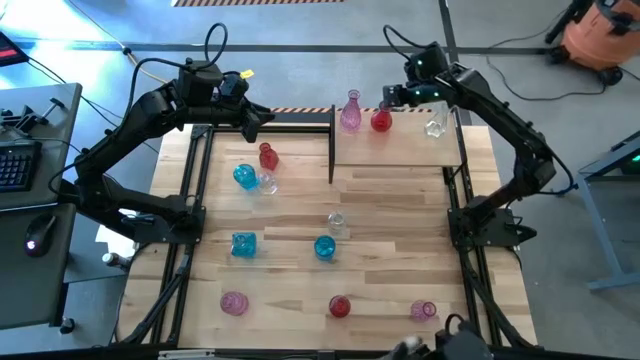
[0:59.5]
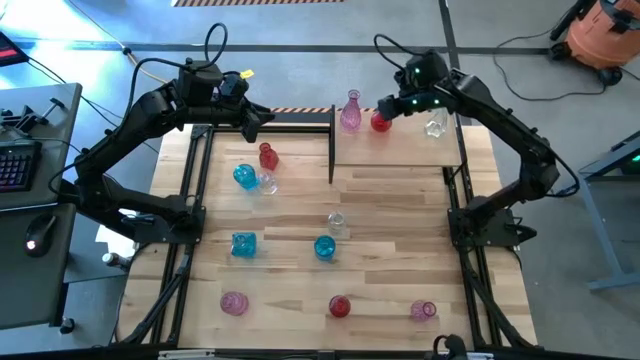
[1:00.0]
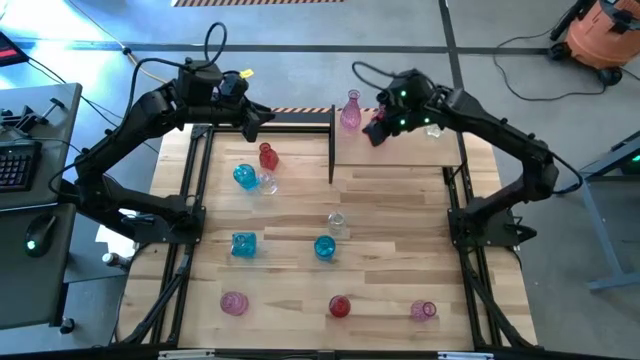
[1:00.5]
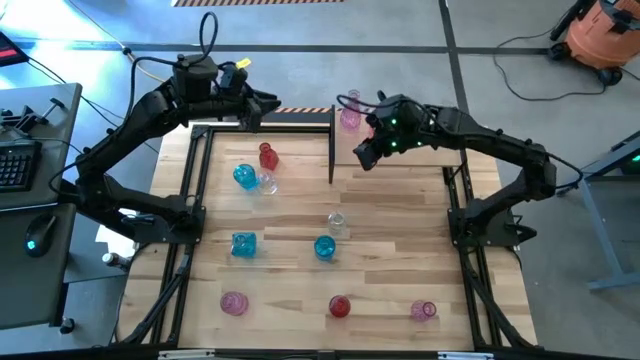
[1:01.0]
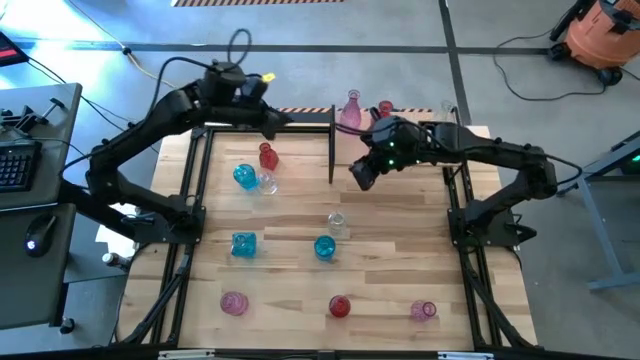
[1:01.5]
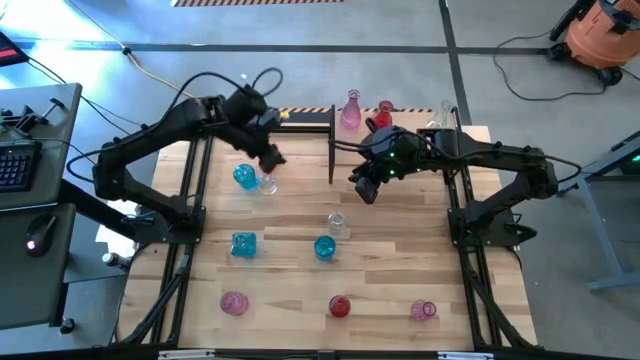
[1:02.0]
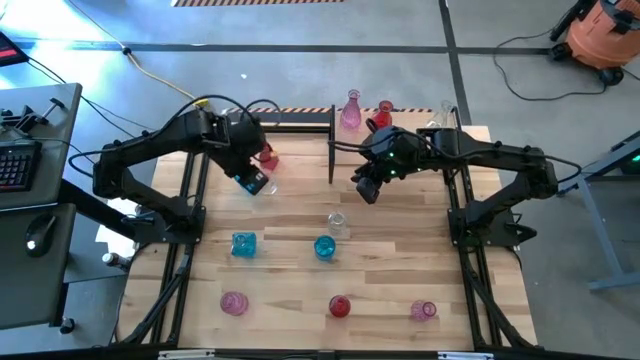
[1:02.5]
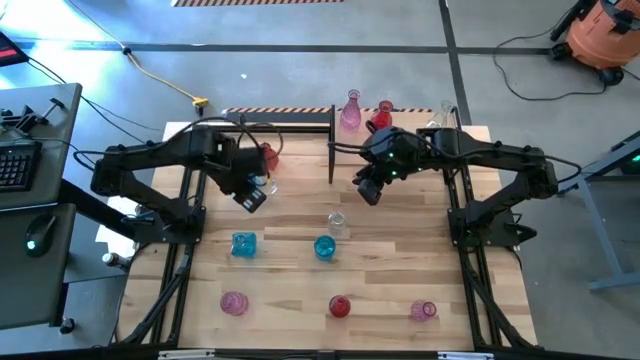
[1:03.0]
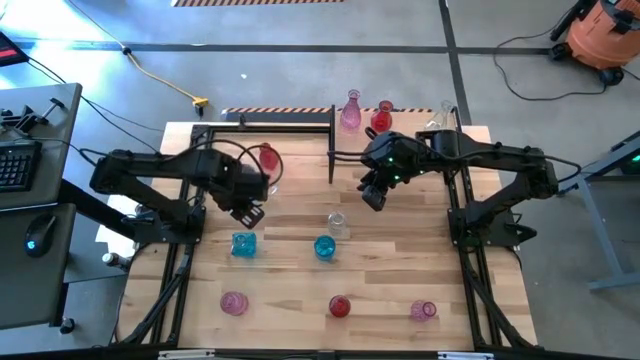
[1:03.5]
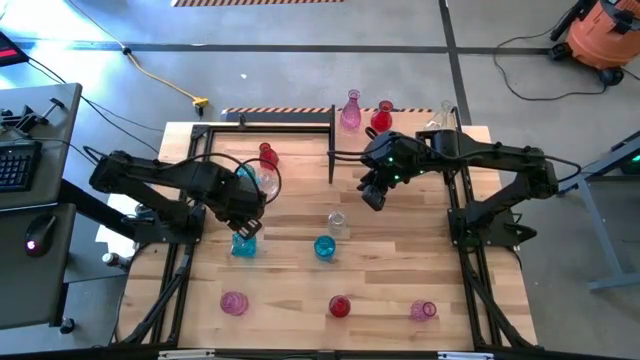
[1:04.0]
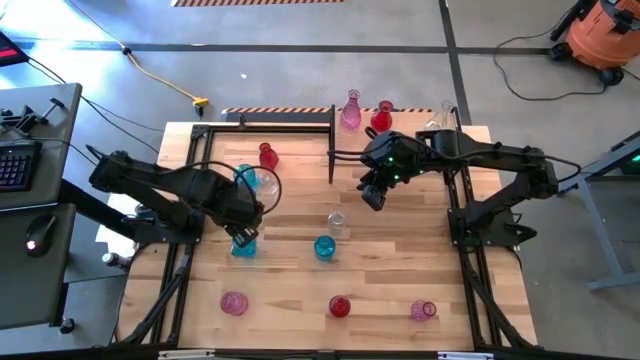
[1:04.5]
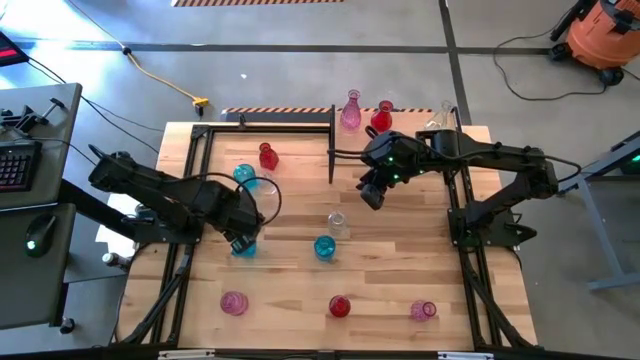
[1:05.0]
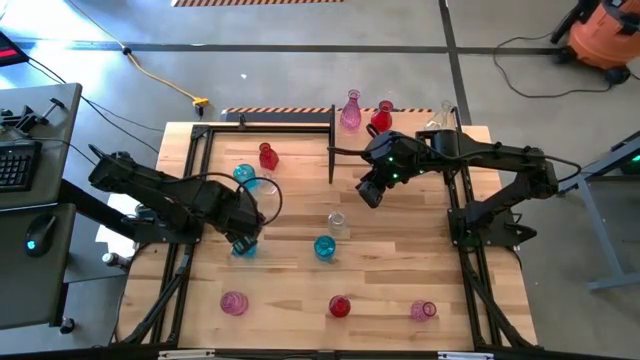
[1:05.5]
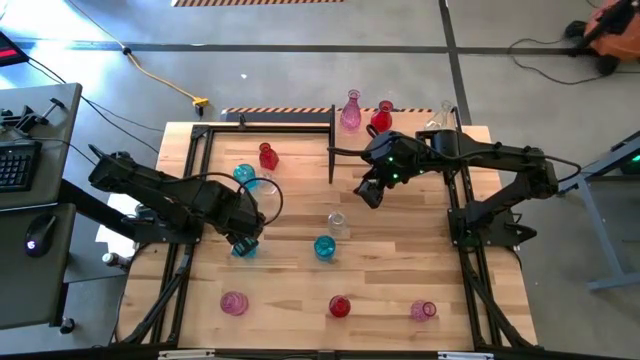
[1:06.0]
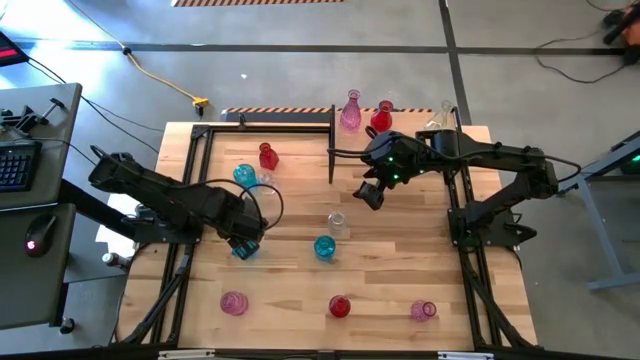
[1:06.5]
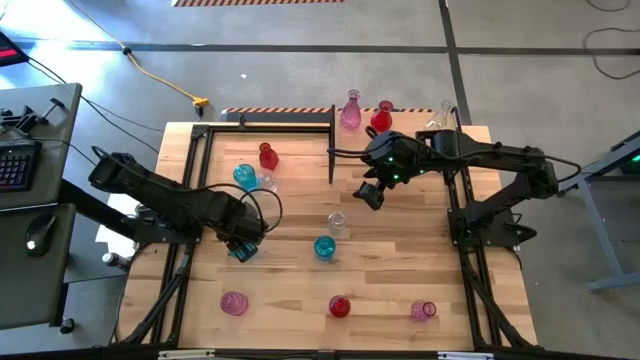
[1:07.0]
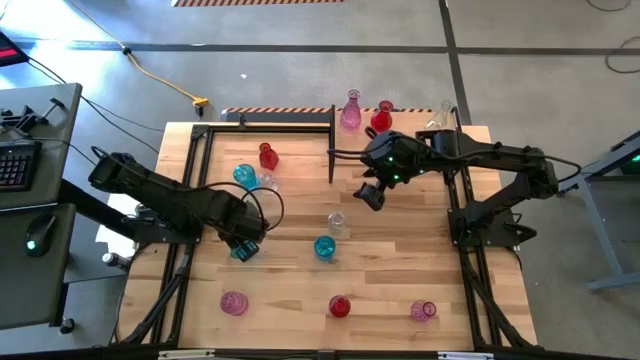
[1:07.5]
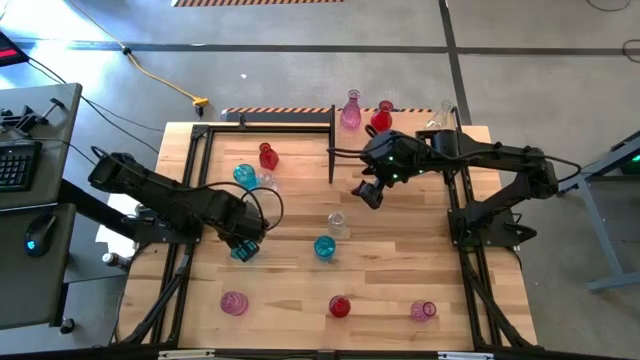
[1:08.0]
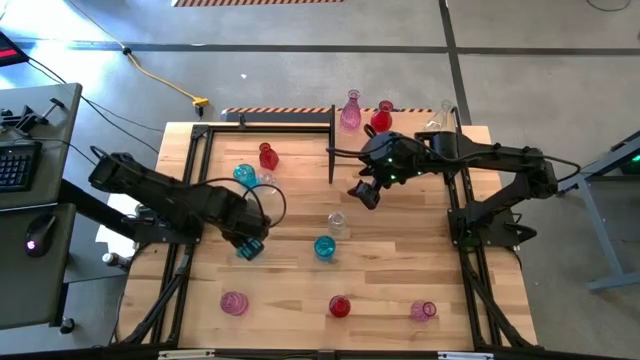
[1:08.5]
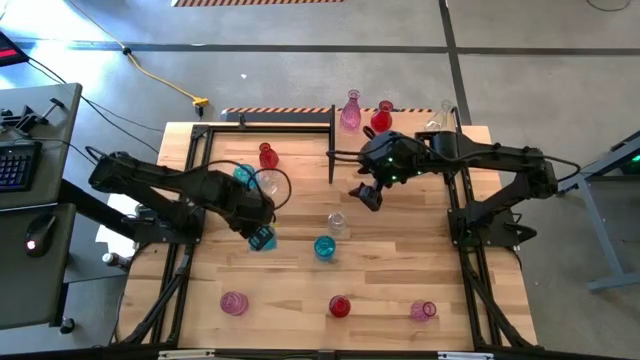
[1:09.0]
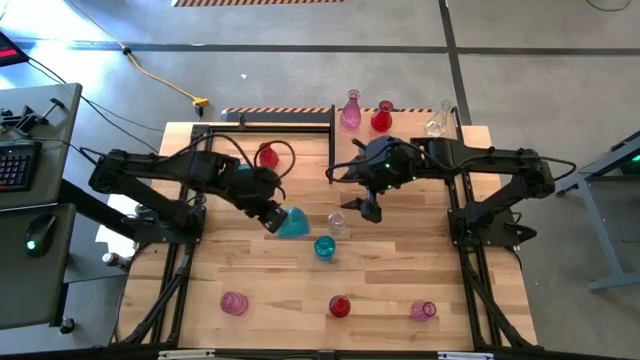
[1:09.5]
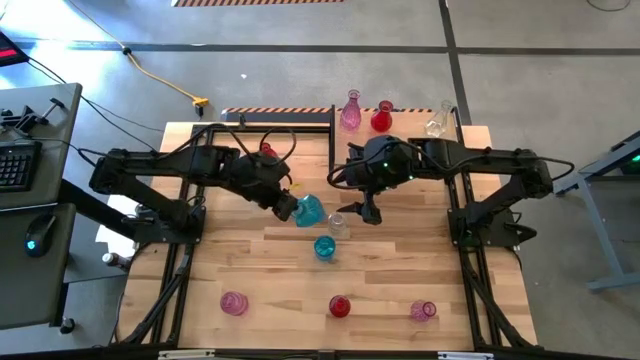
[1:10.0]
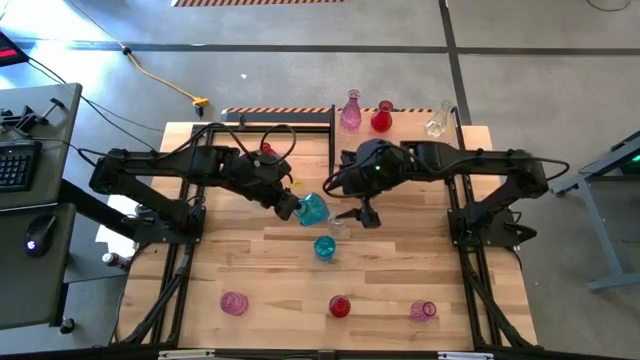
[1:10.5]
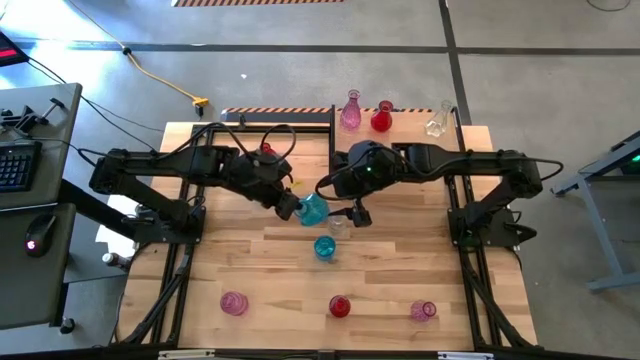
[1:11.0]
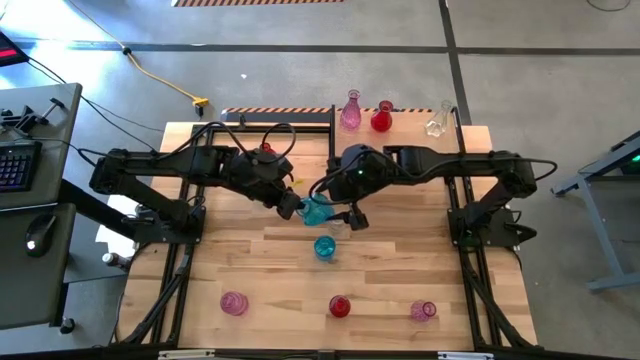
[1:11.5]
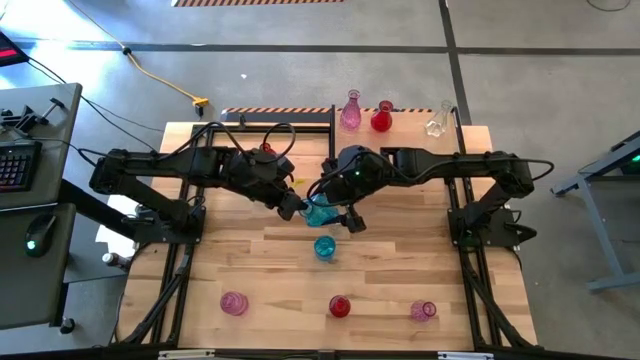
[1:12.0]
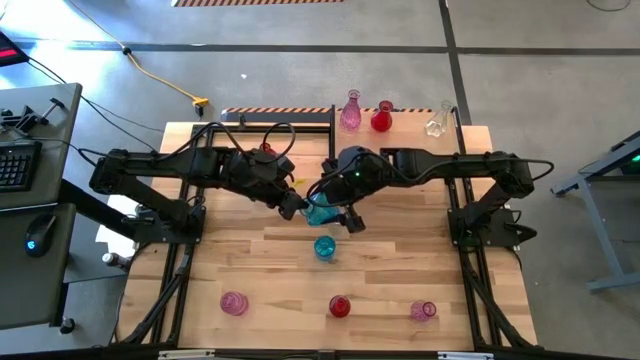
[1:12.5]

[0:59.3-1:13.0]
Task: sort vases onto shelf
Put the bottom left blue vase on the shelf

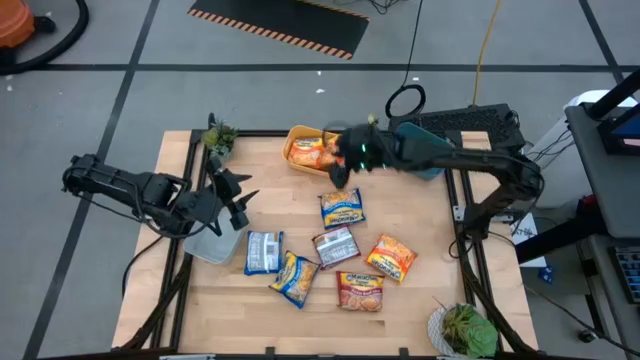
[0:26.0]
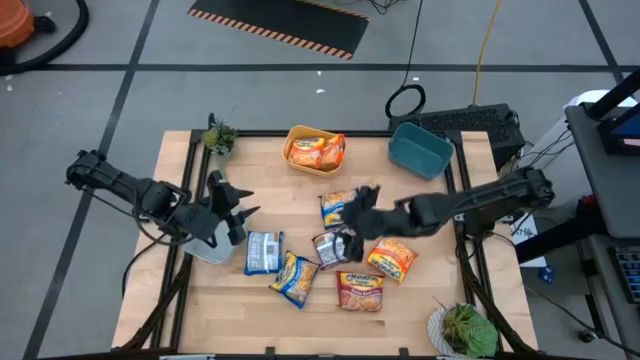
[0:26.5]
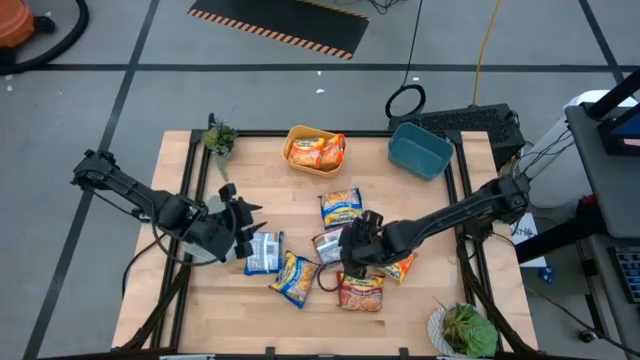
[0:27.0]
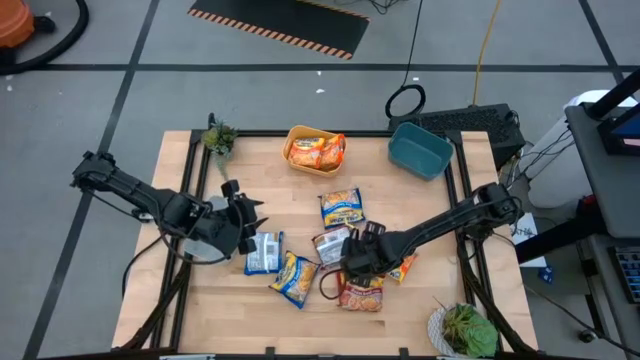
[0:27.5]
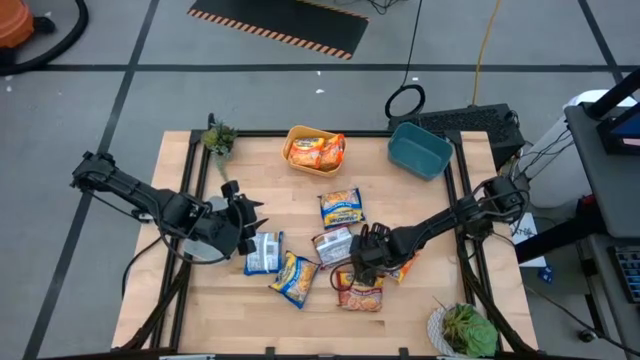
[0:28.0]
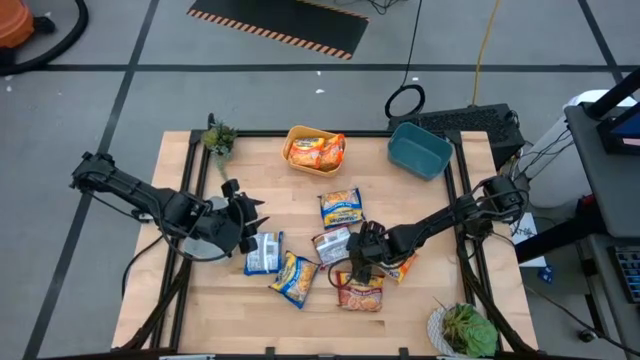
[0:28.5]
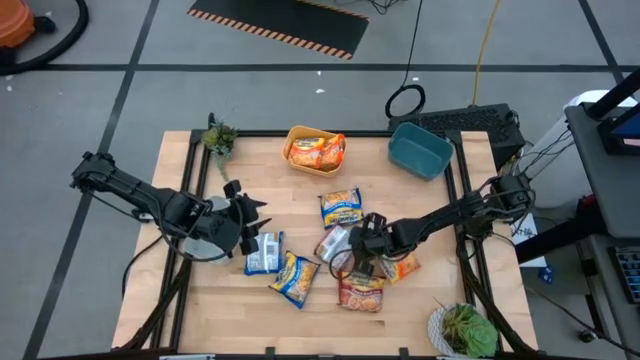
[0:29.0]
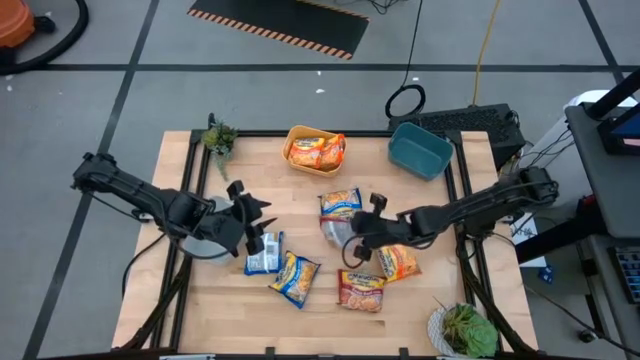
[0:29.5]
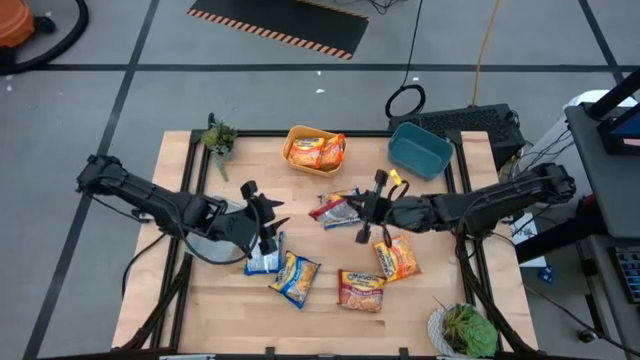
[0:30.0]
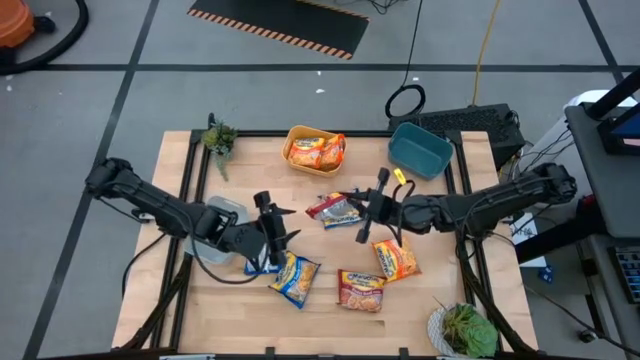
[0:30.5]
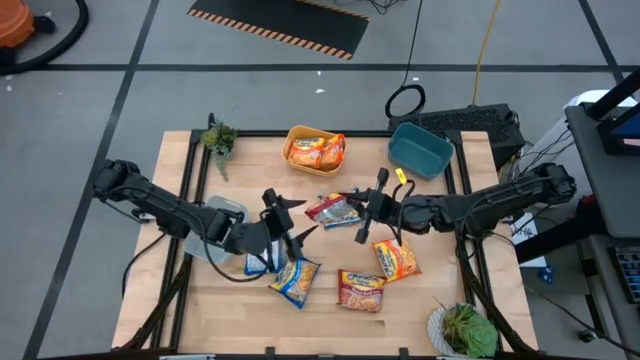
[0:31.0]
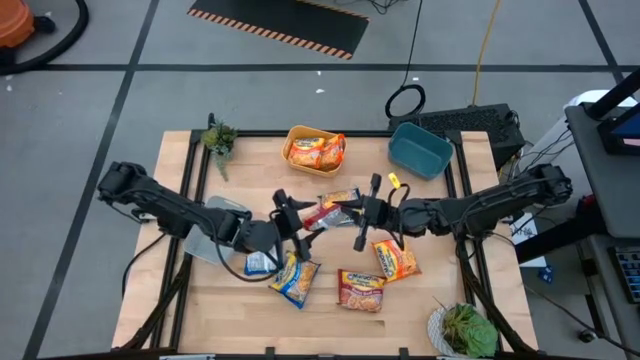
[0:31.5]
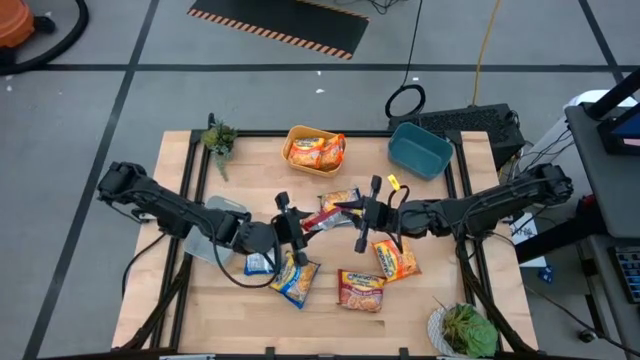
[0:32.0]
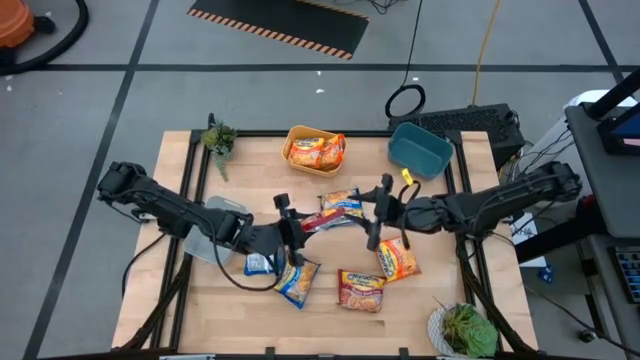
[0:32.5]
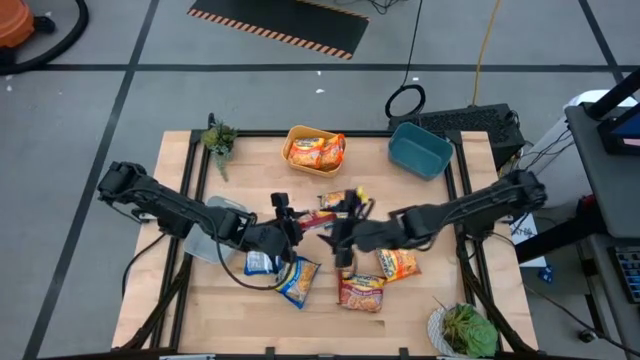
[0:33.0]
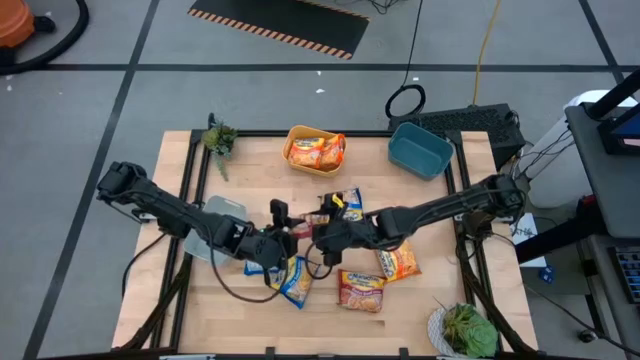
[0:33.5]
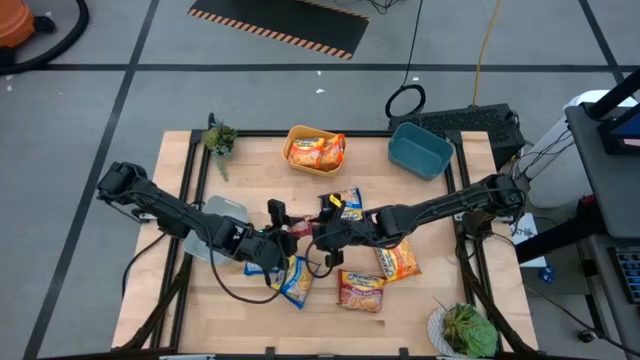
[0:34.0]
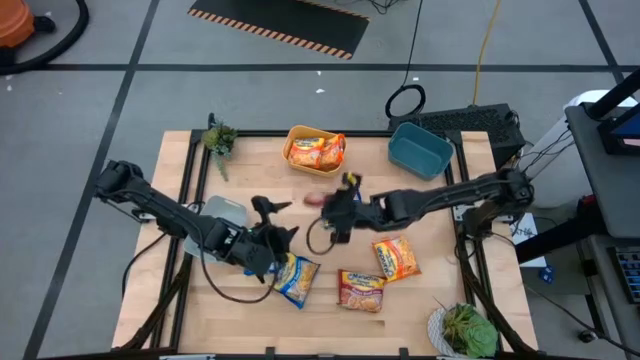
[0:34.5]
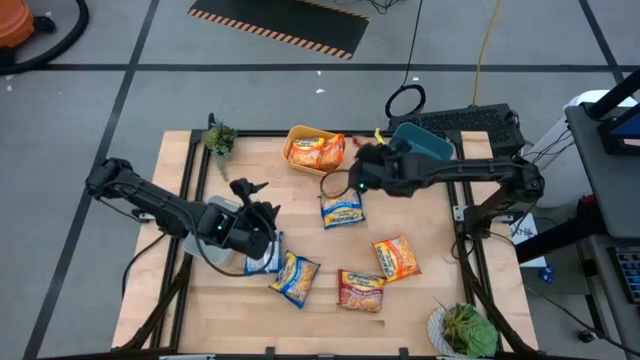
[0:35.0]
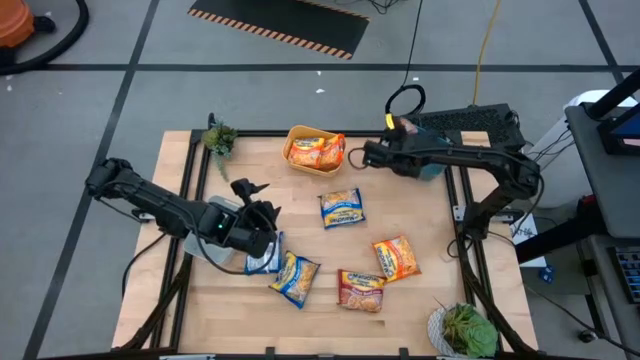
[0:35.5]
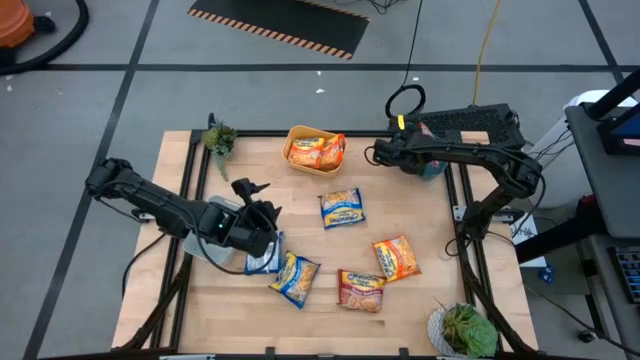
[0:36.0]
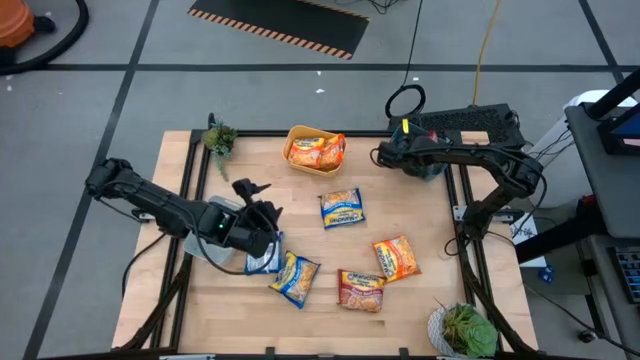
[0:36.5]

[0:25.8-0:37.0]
Task: Sort Maruchan noodles
Put the top red bag into the blue bin
